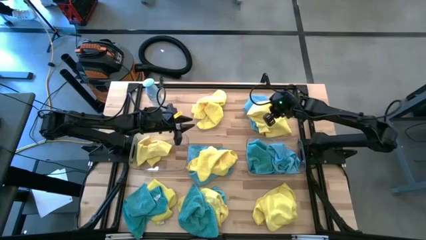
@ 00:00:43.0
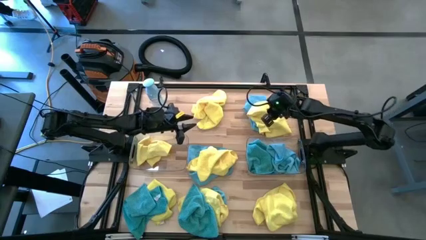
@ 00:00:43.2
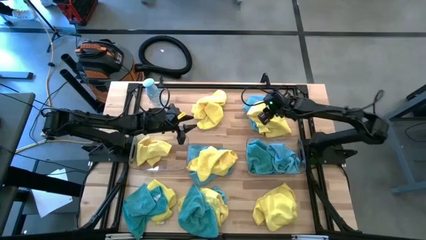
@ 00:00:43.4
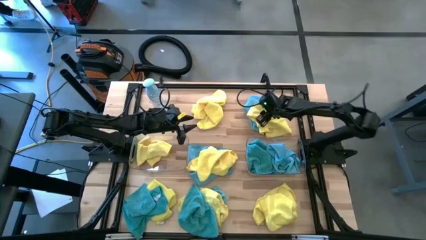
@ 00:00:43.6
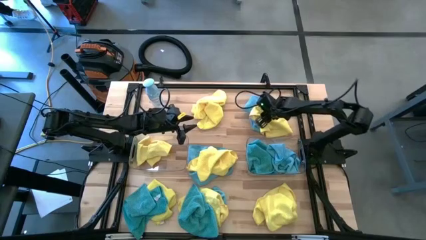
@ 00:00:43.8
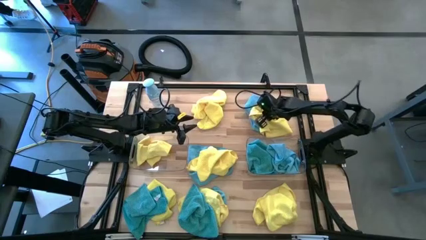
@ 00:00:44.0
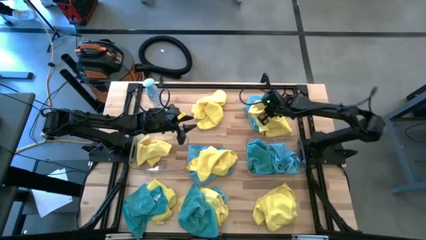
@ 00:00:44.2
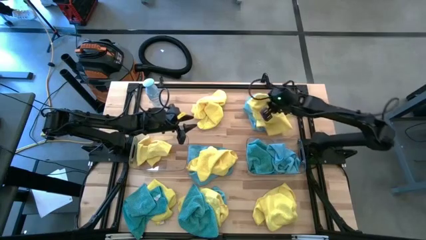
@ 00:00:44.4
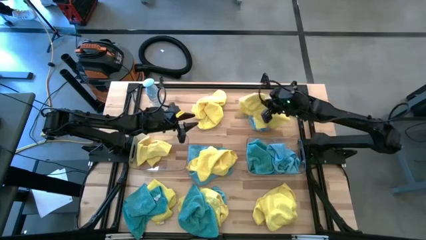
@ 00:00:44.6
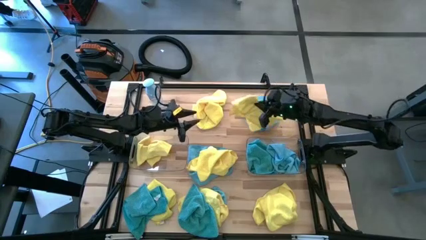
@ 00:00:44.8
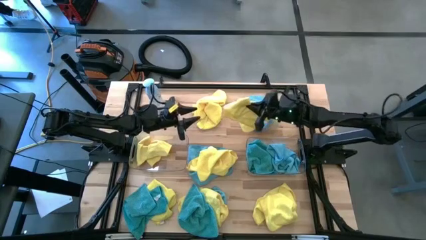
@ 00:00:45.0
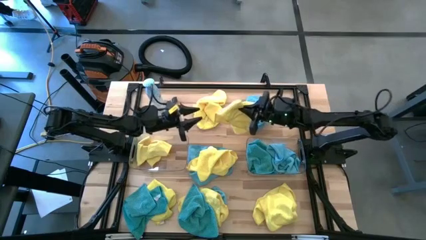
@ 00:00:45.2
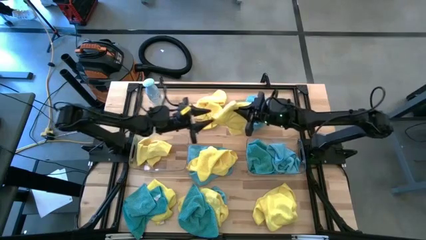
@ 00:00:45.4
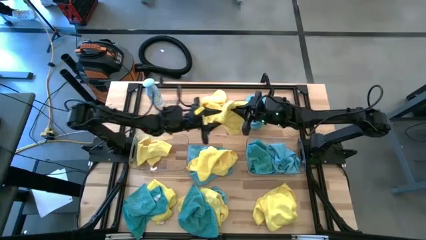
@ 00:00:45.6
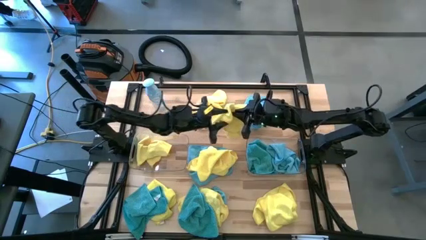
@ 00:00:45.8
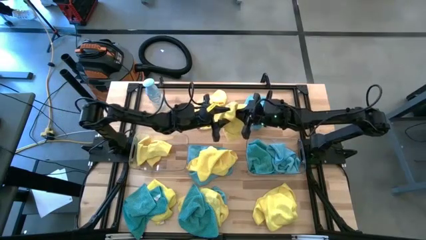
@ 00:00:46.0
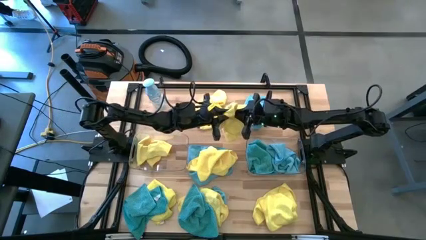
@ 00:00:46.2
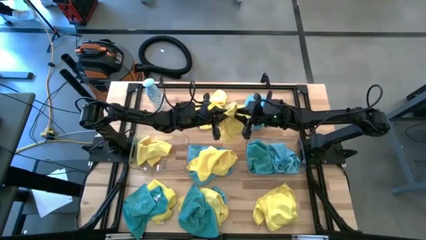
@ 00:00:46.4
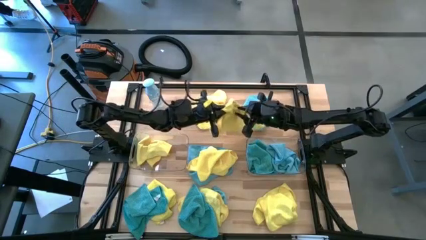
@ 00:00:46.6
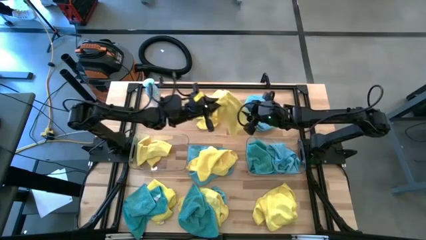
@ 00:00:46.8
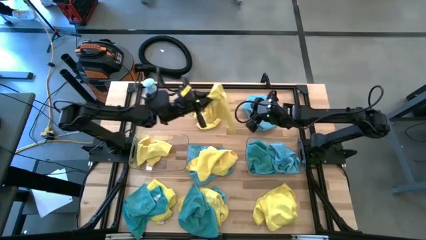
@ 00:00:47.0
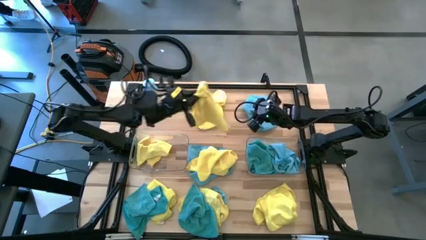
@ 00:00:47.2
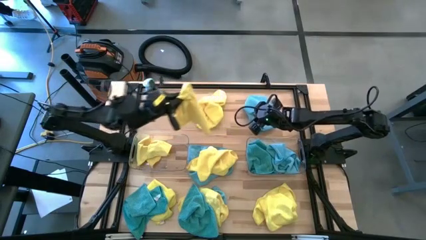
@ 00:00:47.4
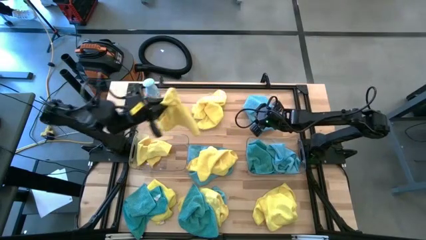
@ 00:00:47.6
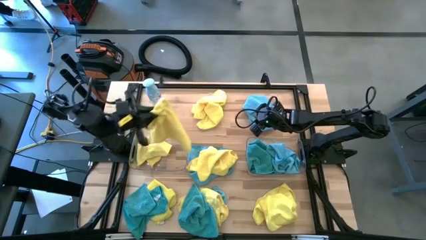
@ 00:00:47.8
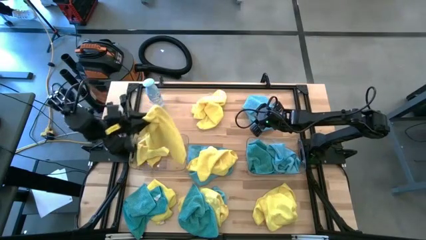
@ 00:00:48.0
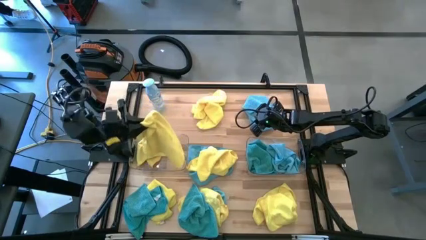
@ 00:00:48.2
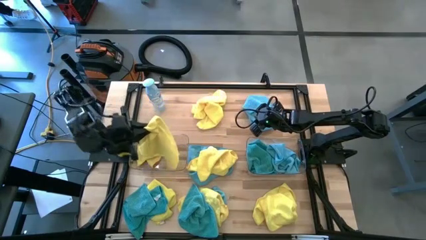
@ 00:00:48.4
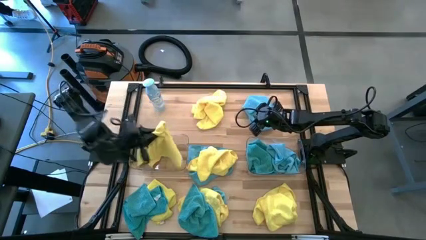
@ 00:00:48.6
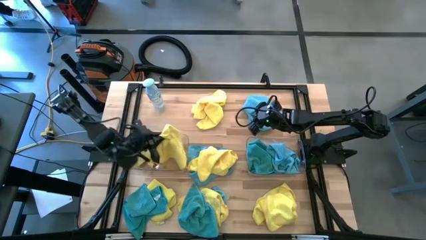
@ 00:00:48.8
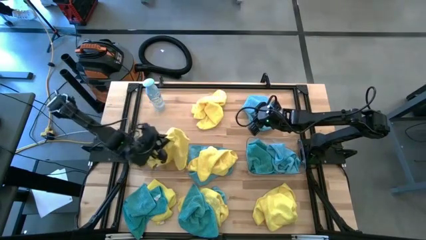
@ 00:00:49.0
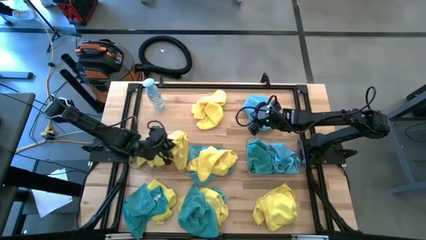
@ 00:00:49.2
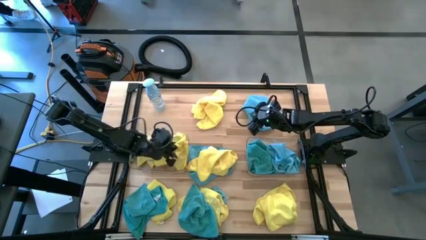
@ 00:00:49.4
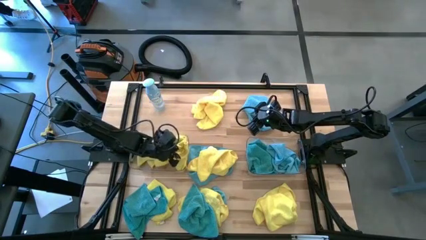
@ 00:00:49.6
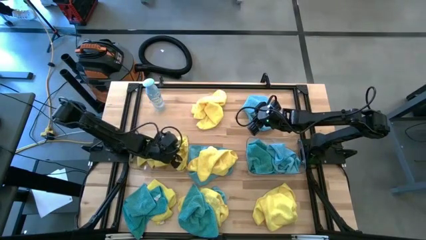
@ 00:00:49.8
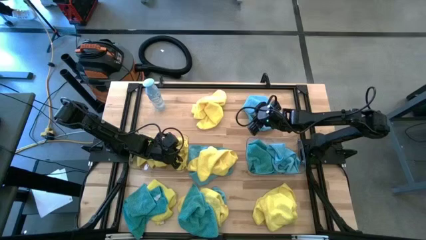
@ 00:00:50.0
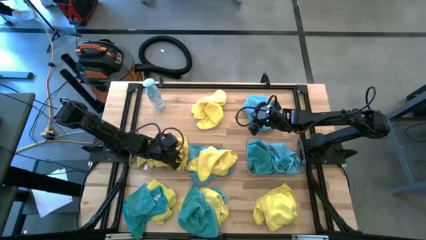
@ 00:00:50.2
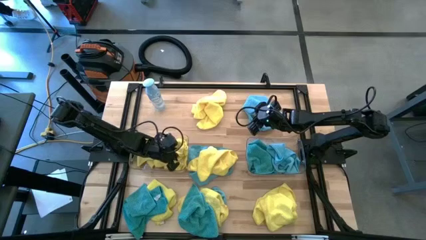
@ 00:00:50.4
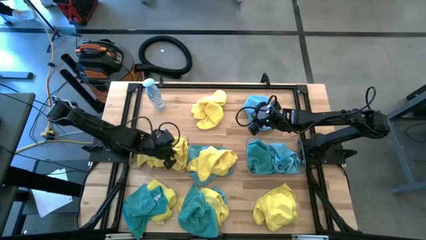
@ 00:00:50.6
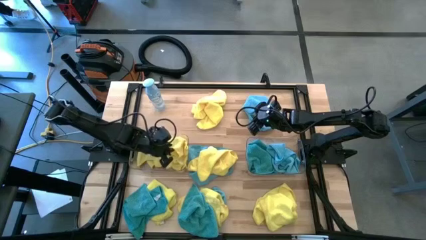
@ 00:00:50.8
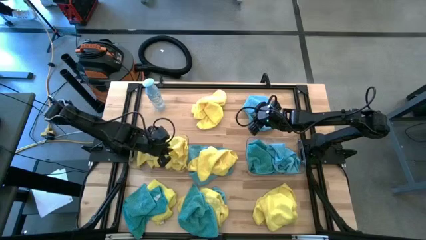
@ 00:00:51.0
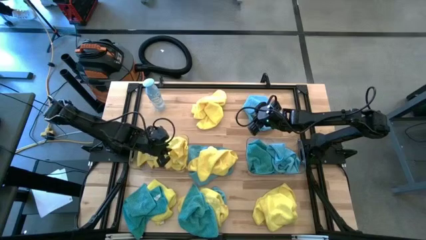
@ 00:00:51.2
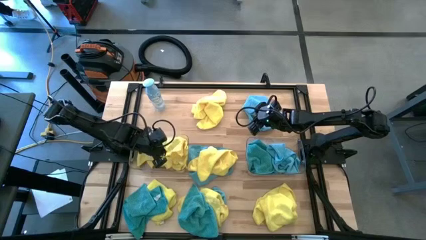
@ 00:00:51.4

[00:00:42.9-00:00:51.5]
Task: Sort microfiber towel by color & place in baskets
Put the yellow microfiber cloth into the left transparent bin

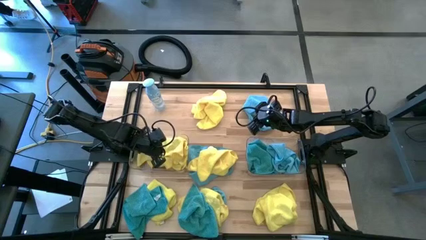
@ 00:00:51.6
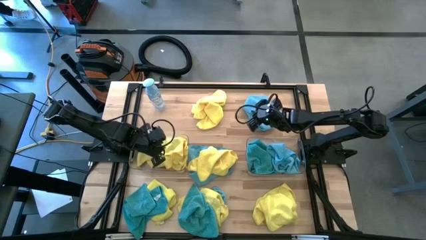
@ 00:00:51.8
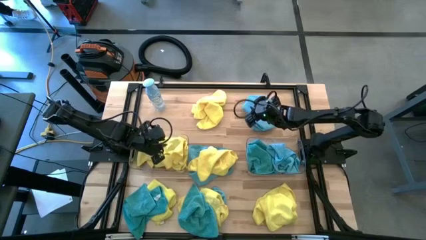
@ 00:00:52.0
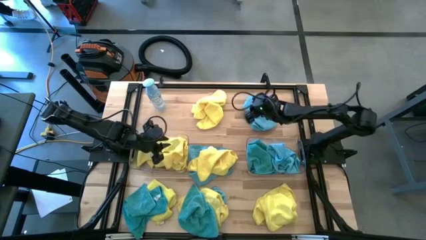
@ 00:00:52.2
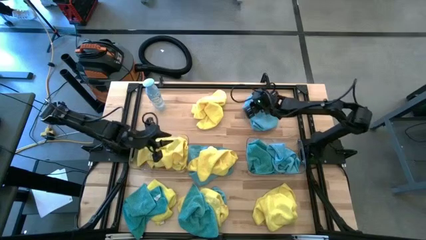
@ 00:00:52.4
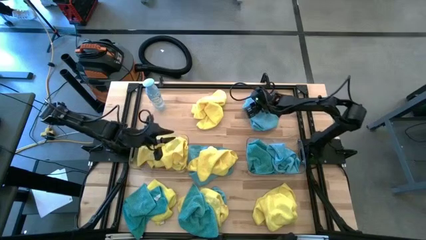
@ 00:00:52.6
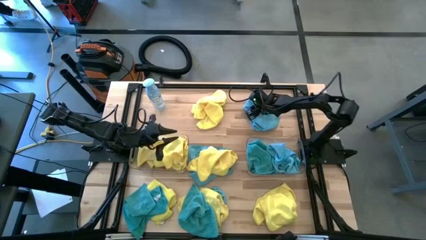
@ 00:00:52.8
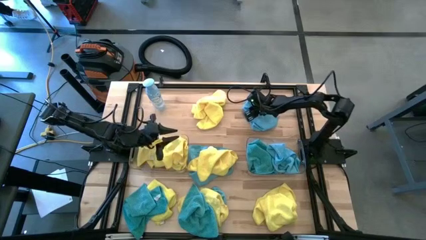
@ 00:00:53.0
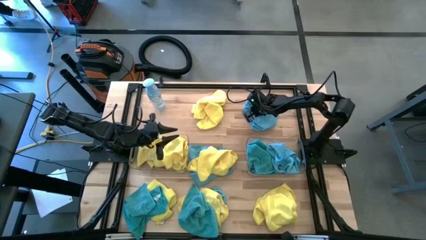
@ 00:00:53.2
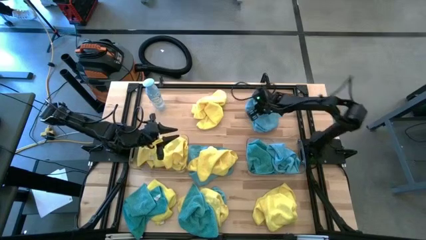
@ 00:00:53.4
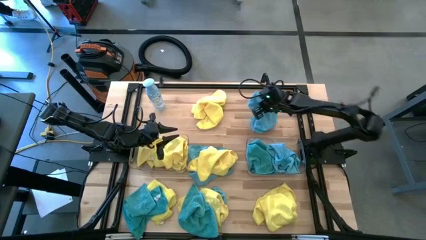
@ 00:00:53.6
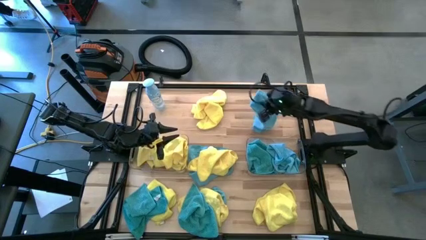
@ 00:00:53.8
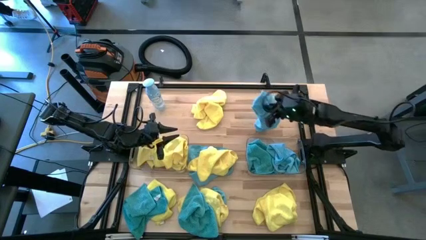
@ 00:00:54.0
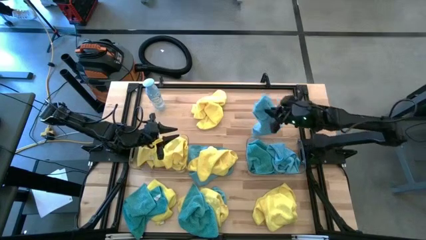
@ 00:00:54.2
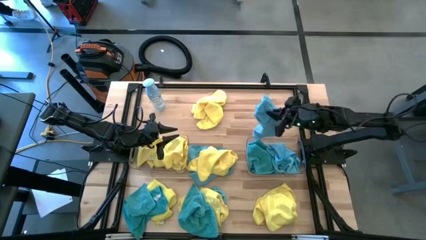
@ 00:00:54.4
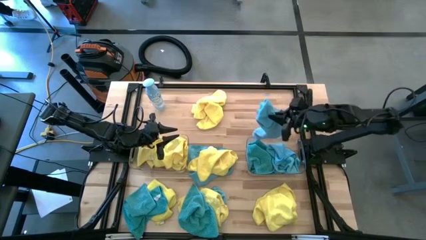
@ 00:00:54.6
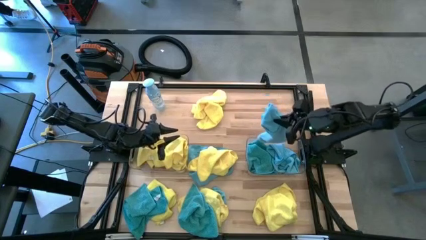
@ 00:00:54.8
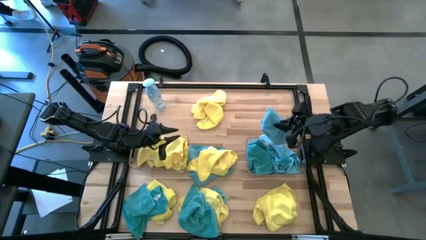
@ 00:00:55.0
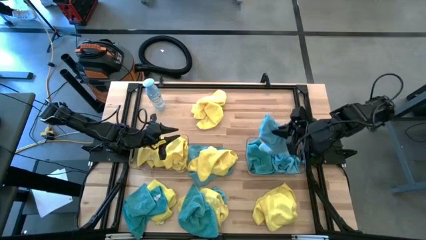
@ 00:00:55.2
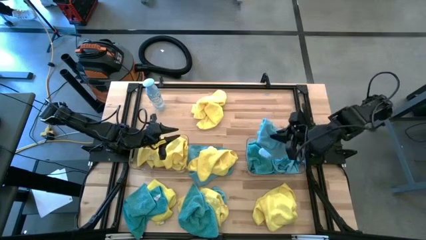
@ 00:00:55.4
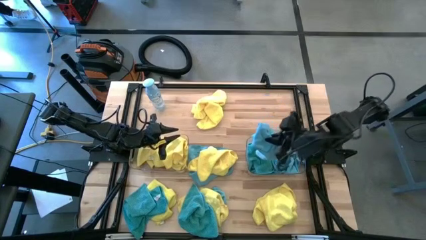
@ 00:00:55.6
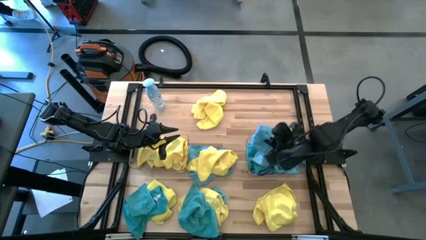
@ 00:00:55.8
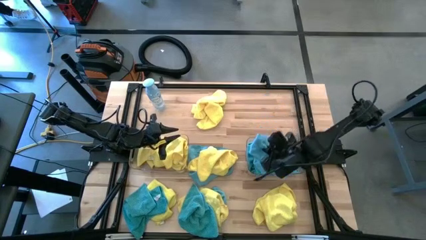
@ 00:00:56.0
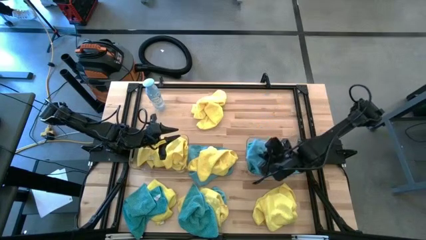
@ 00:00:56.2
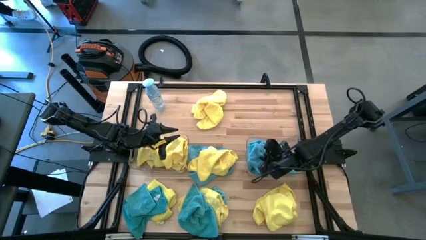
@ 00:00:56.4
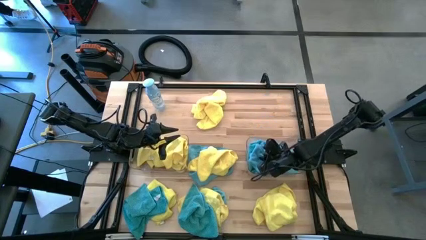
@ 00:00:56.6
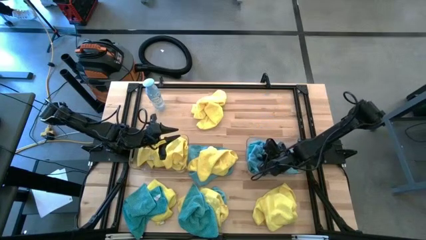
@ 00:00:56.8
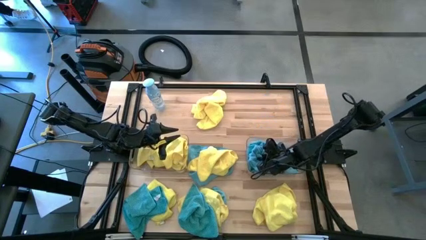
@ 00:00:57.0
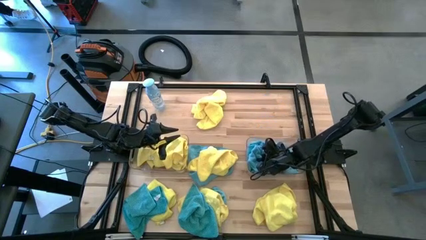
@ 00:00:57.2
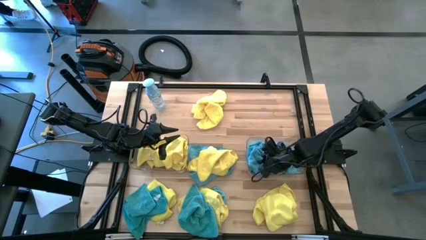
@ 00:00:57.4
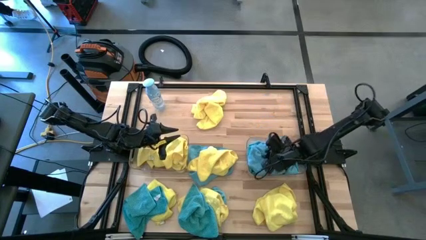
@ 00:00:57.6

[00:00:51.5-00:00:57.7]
Put the blue microfiber cloth into the right transparent bin
